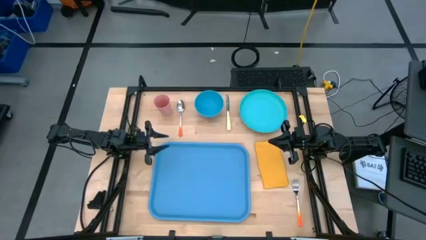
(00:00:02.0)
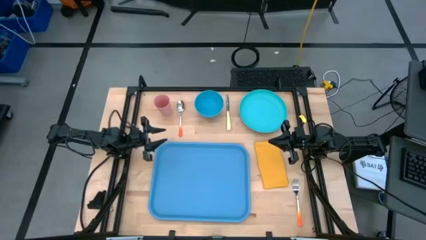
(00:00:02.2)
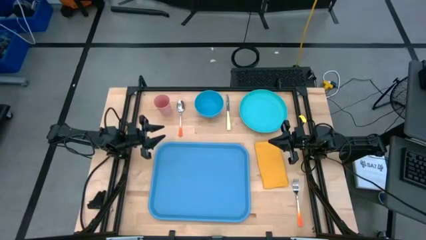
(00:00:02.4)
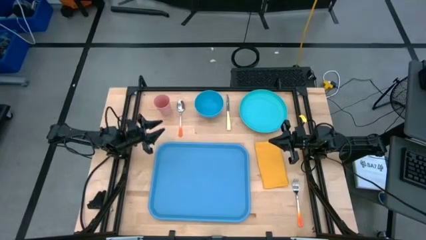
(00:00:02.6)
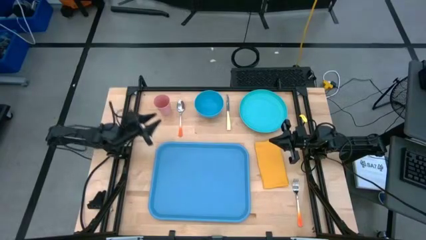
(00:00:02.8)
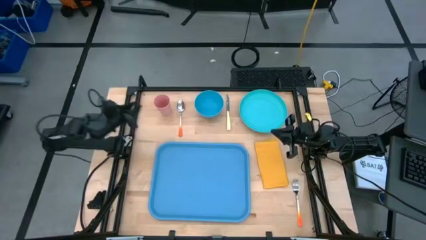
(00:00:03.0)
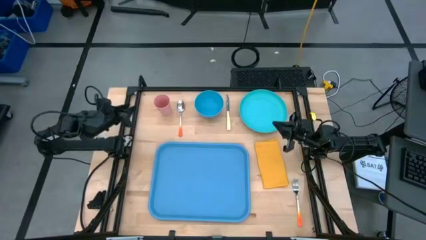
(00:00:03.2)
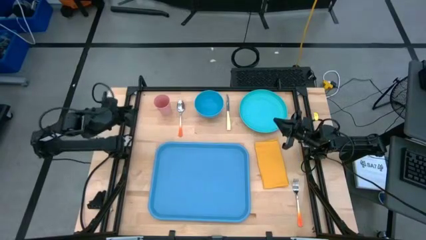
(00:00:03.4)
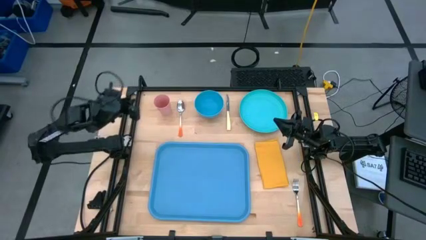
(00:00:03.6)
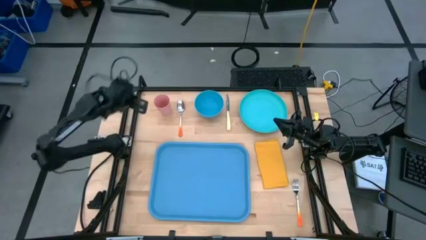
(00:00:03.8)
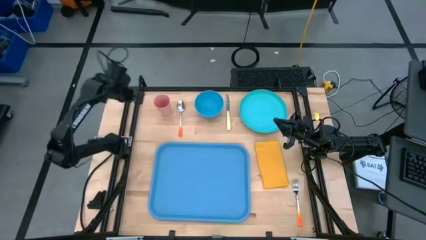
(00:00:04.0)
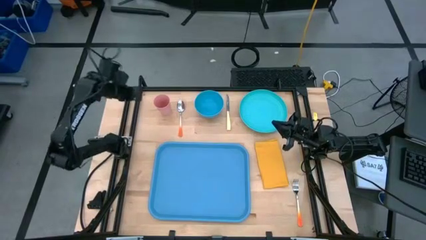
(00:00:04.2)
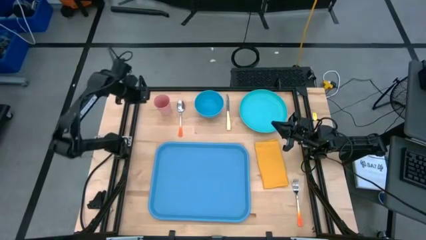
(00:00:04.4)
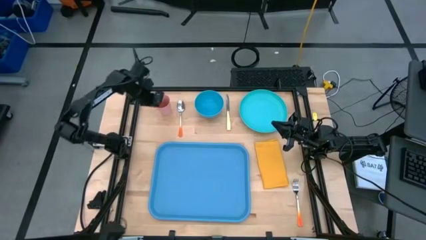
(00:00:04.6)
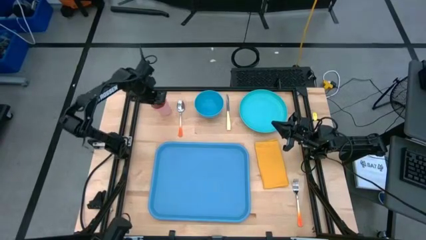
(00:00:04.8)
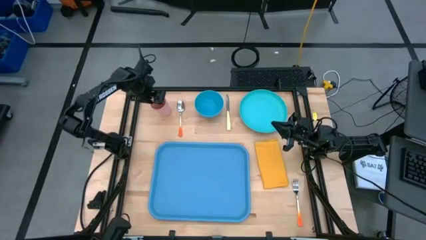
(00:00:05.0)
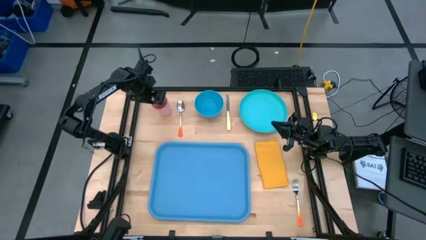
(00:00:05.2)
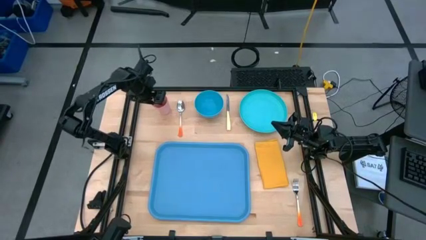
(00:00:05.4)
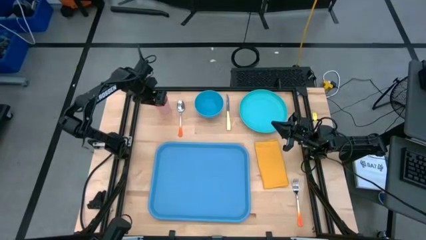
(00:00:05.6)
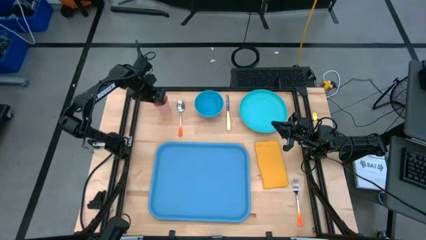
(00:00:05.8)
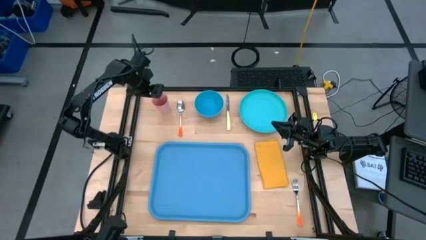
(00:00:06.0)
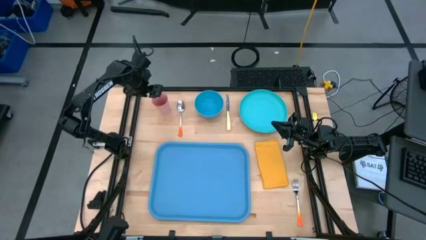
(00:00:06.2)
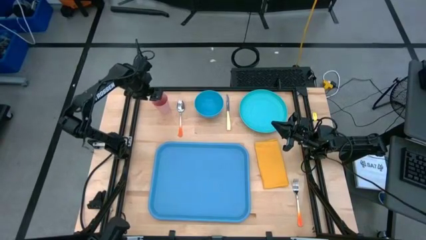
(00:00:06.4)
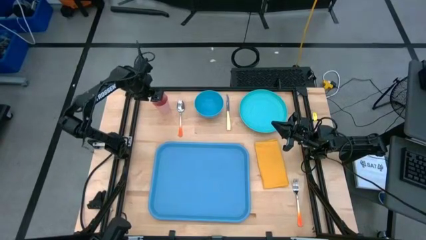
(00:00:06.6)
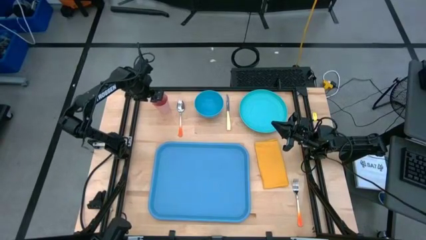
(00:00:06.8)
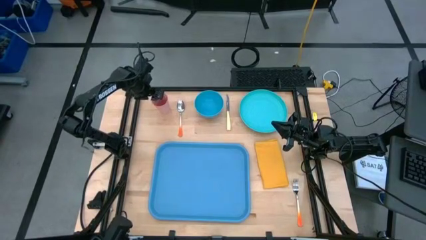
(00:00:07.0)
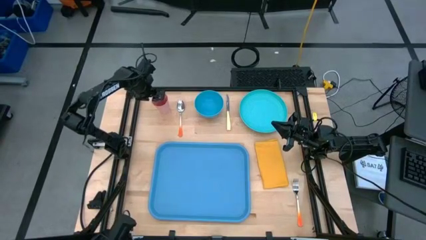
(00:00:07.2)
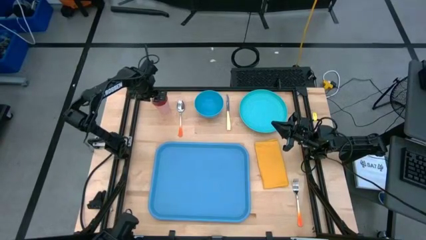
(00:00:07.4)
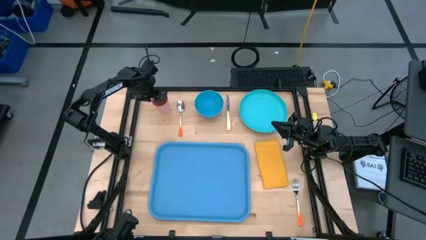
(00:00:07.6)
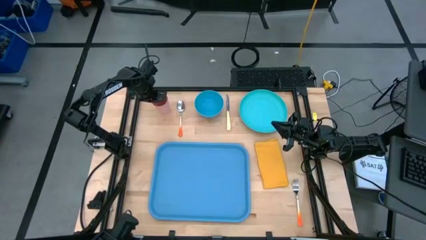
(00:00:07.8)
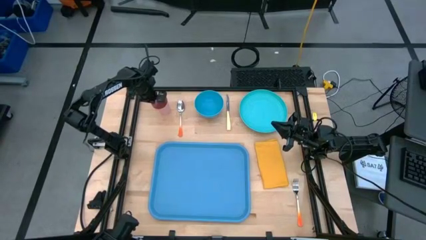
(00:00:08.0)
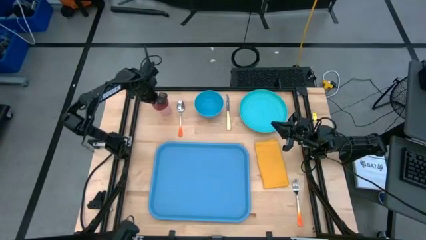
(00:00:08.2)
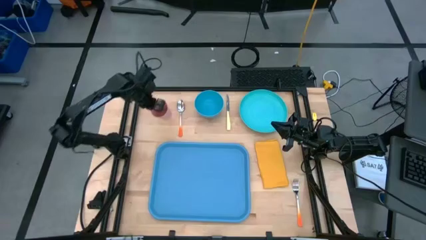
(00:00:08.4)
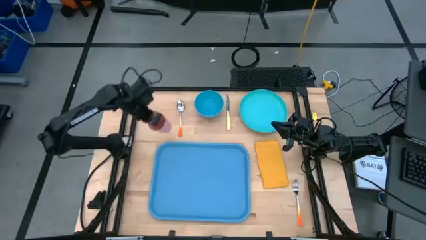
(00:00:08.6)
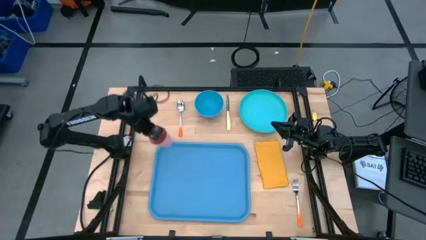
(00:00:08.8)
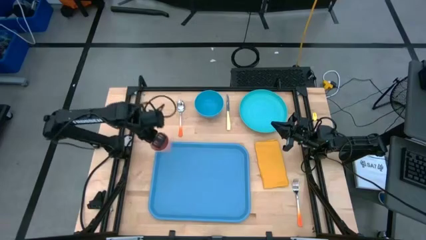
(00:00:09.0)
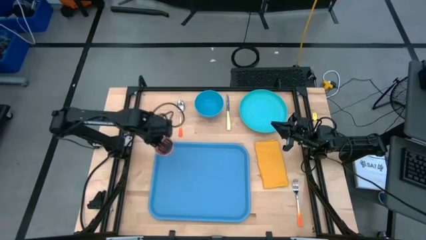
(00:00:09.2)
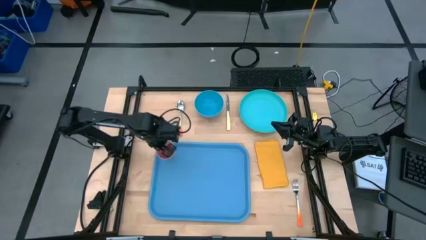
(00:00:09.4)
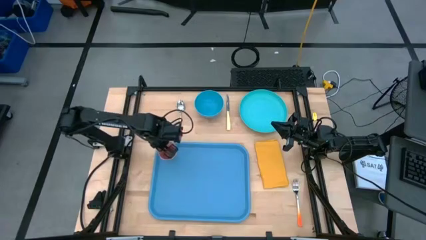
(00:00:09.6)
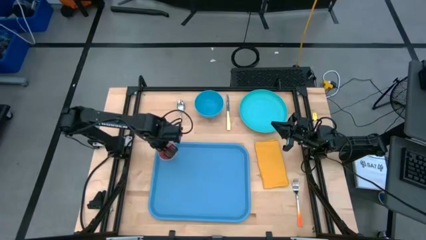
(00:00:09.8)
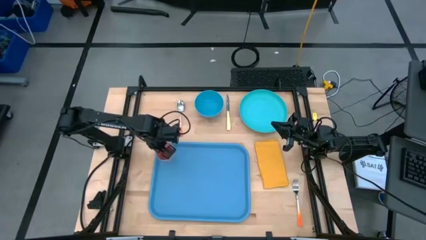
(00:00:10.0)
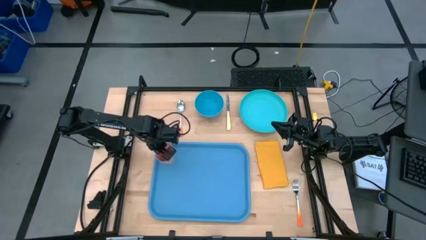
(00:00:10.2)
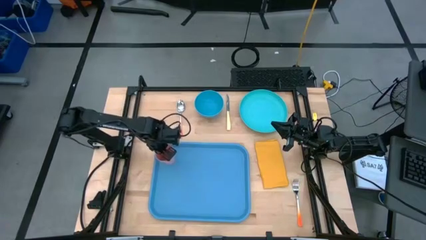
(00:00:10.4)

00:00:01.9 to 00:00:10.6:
Task: Set up tray
Put the pink cup on the blue serving tray

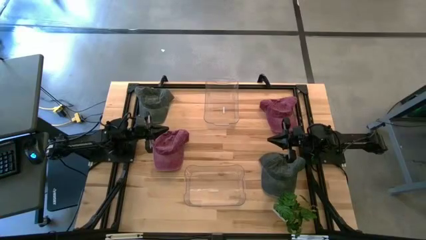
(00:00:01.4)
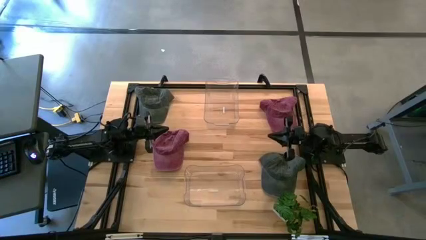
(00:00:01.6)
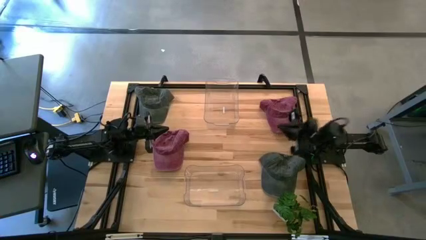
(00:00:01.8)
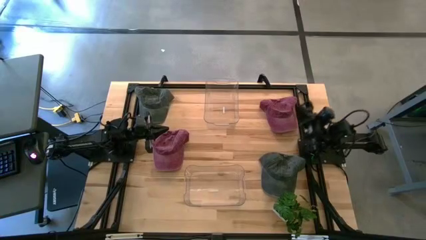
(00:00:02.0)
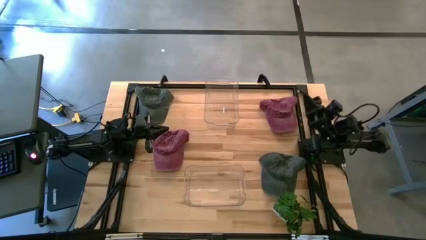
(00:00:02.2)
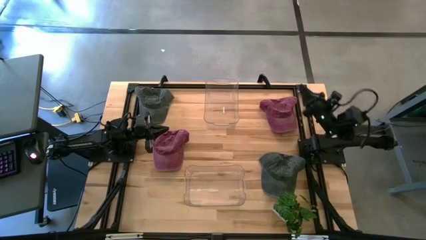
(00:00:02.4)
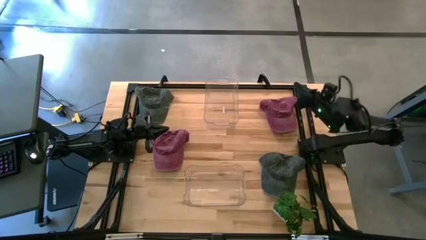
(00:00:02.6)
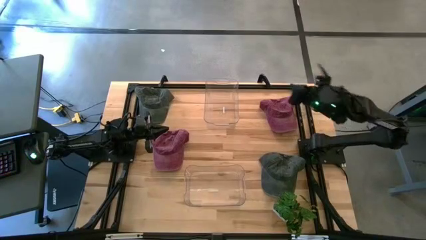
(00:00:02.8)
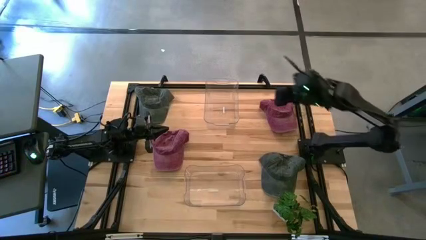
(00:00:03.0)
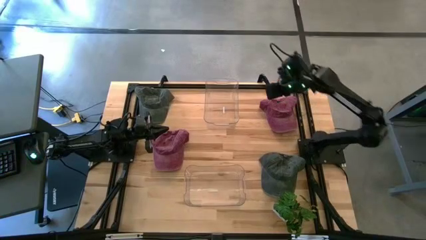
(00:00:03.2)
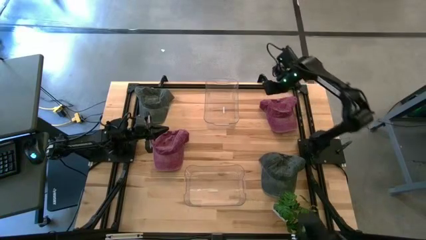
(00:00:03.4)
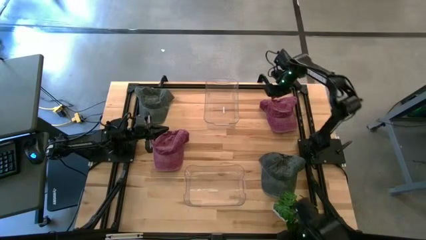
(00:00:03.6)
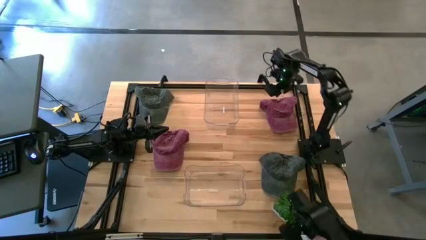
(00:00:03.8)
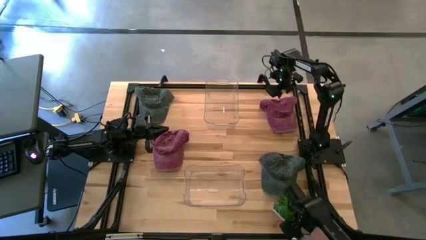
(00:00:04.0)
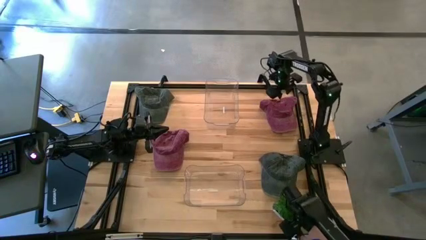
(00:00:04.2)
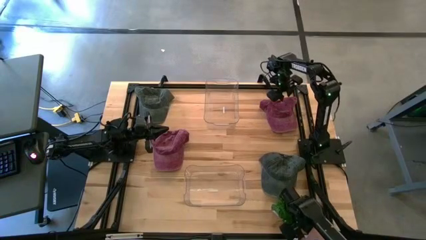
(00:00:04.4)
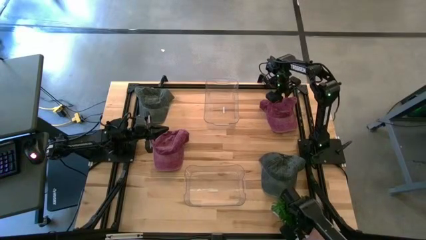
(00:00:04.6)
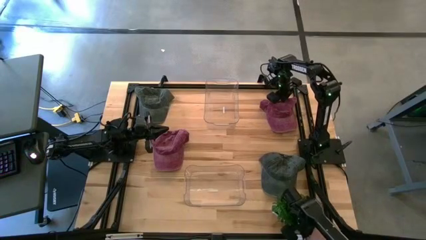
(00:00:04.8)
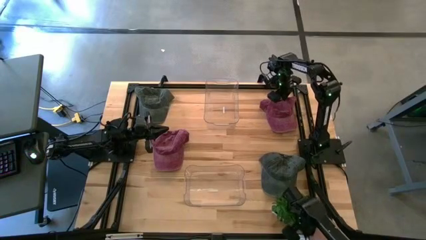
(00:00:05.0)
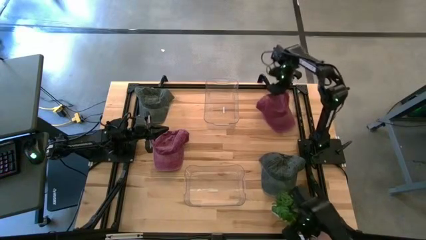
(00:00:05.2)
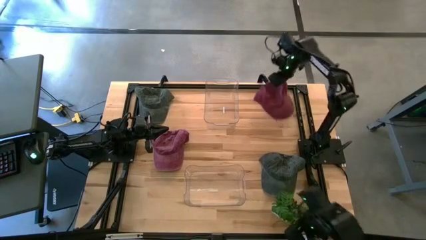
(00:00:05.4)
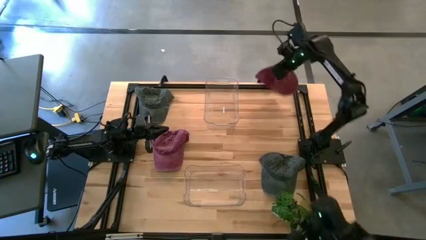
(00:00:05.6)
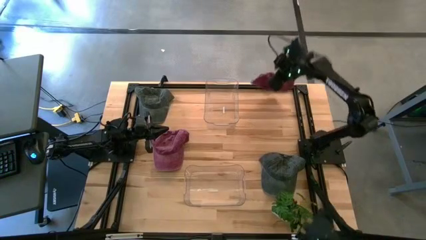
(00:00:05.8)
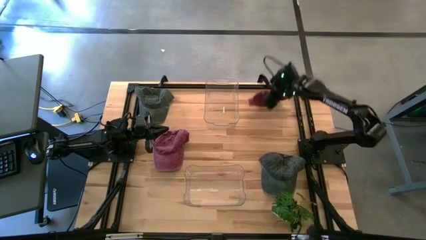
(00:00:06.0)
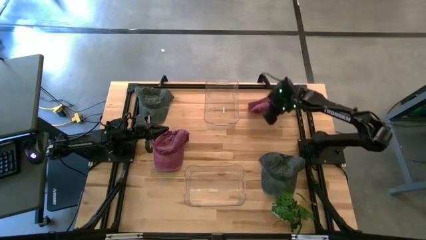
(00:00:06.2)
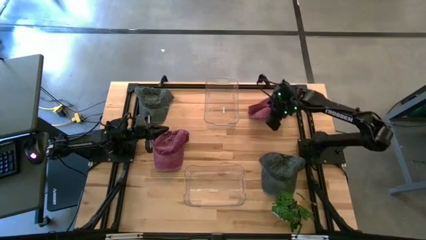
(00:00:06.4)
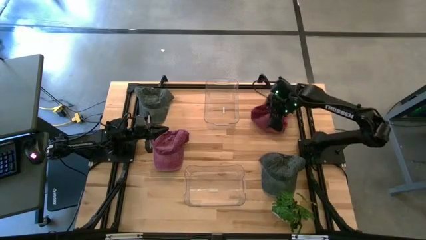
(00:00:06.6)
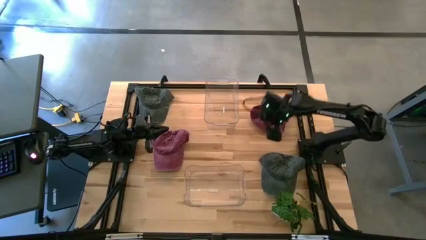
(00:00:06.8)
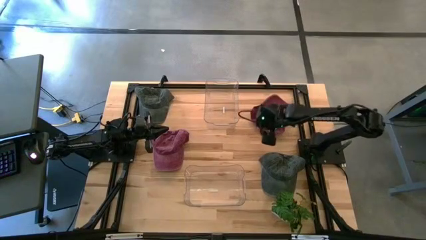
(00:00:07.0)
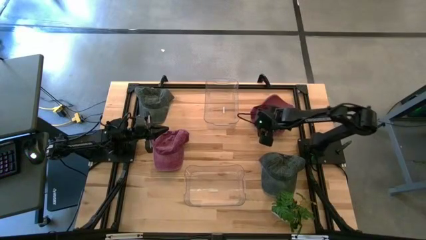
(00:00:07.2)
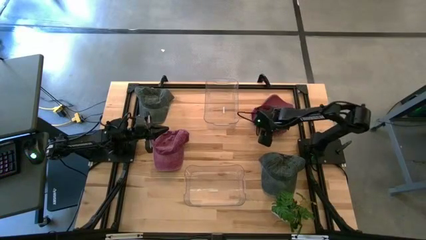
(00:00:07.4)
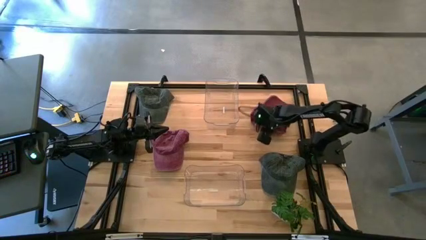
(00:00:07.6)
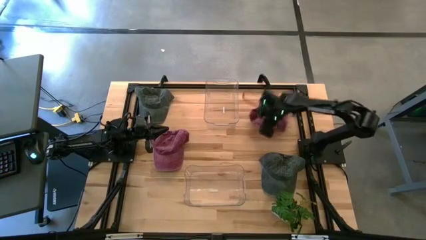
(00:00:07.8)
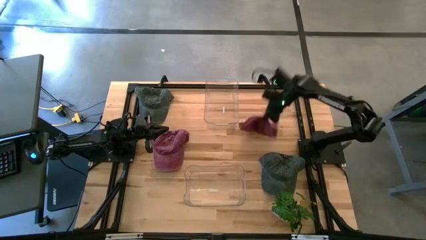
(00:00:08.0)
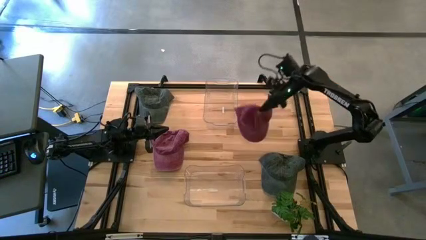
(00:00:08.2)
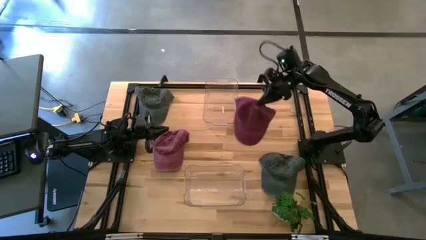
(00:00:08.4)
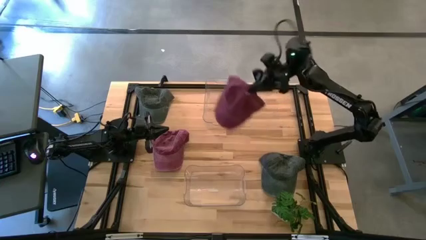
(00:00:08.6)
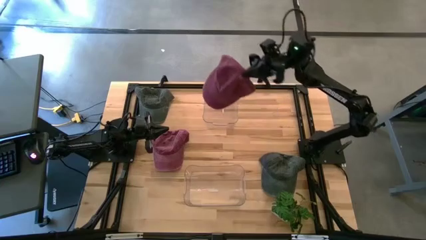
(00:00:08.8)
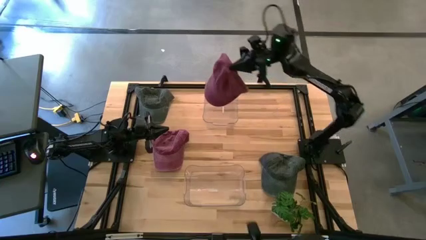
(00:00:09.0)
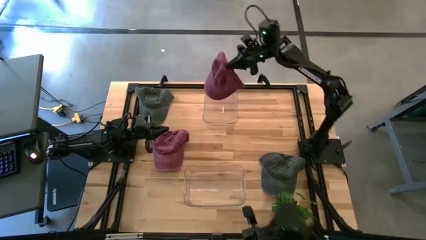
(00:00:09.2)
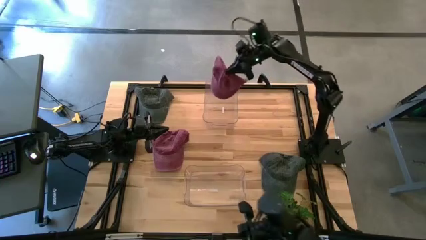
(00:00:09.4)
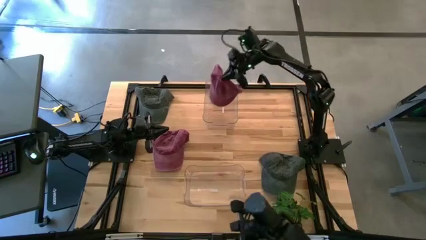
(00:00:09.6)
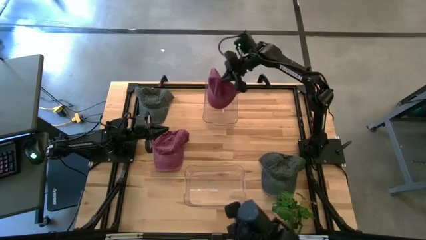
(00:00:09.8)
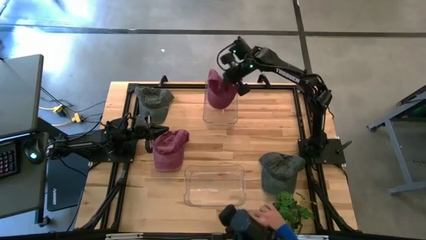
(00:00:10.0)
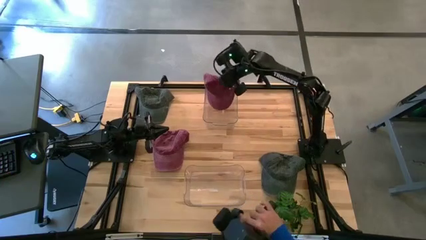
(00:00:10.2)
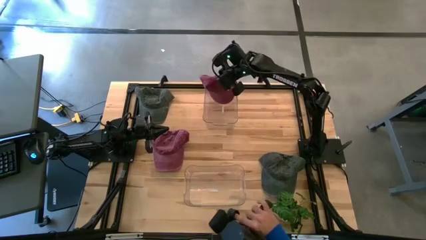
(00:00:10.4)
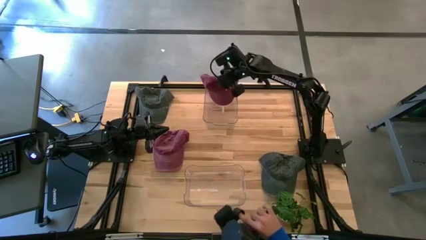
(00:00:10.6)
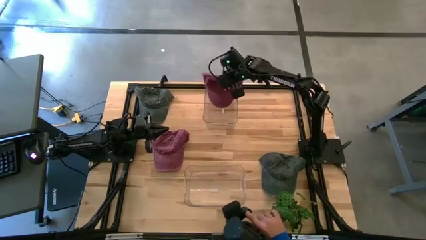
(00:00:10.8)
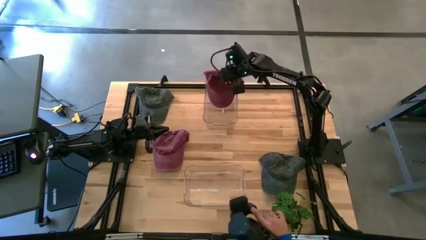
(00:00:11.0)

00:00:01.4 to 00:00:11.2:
Task: Pick & Place hat
Put the right red cap into the top transparent bin
